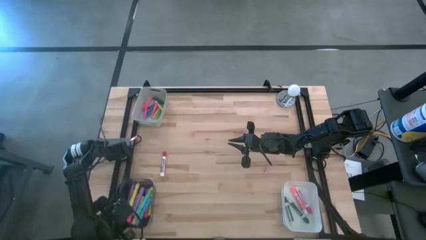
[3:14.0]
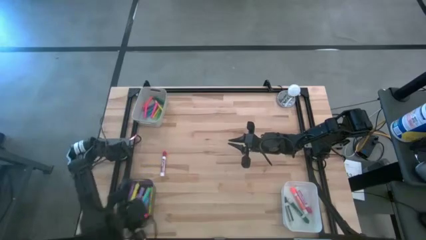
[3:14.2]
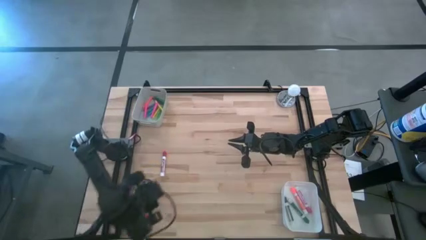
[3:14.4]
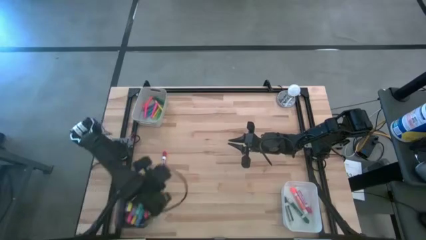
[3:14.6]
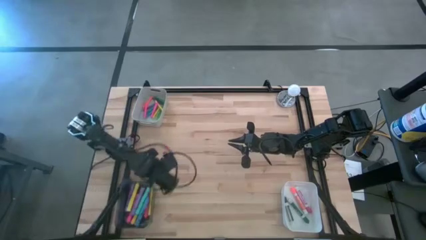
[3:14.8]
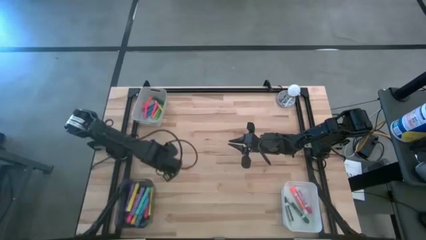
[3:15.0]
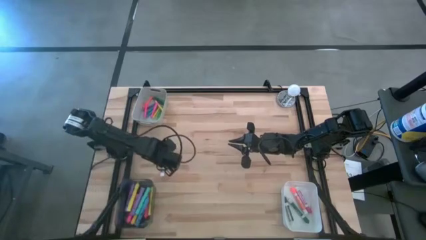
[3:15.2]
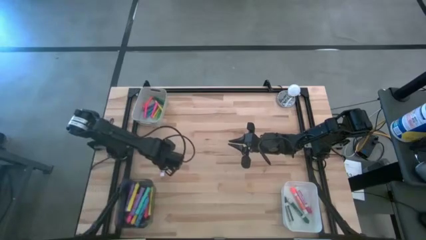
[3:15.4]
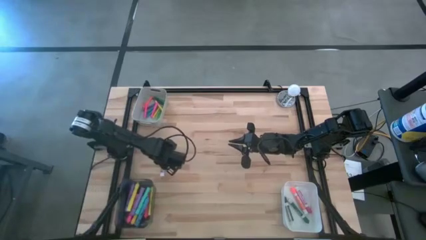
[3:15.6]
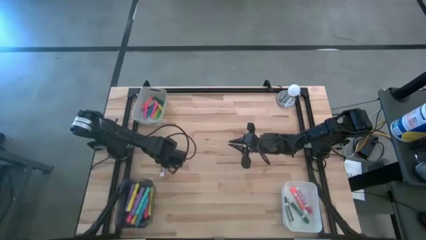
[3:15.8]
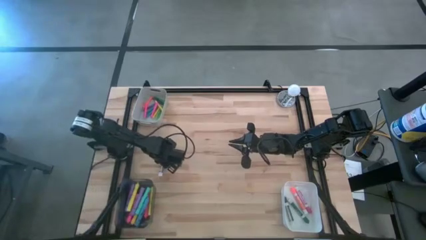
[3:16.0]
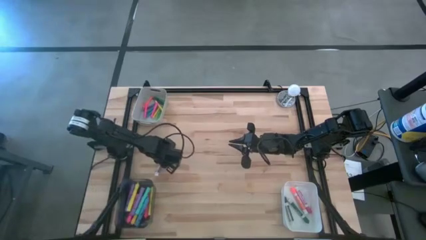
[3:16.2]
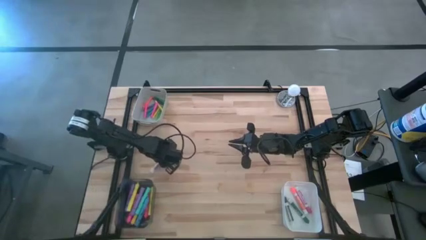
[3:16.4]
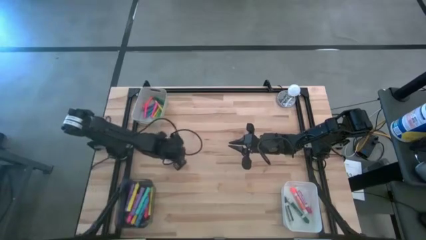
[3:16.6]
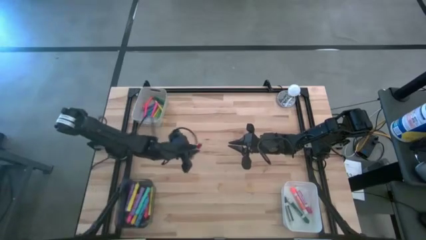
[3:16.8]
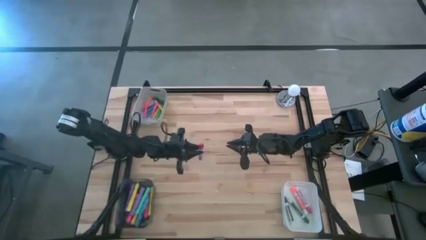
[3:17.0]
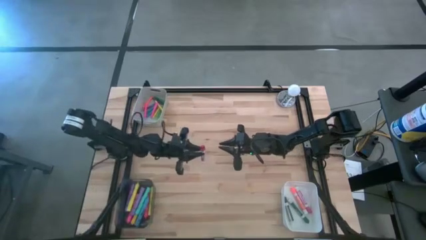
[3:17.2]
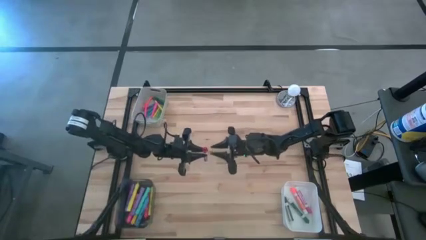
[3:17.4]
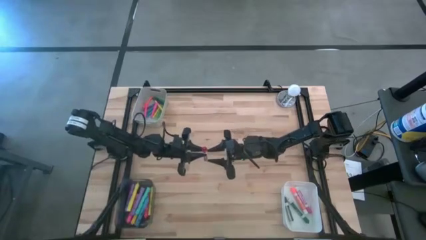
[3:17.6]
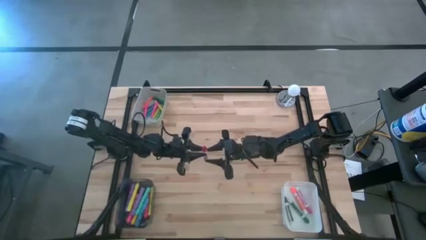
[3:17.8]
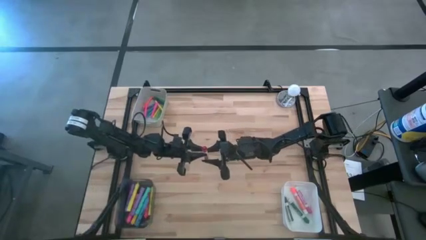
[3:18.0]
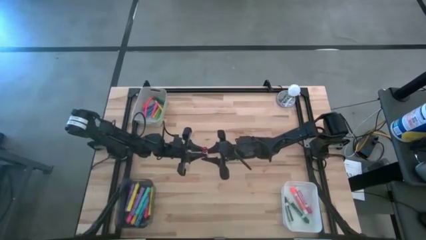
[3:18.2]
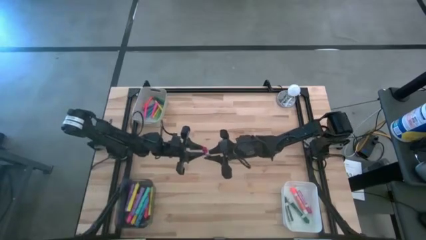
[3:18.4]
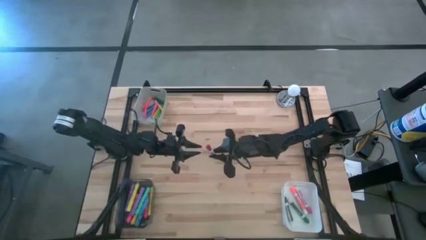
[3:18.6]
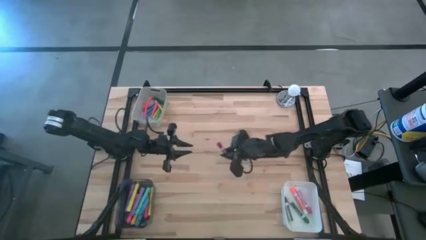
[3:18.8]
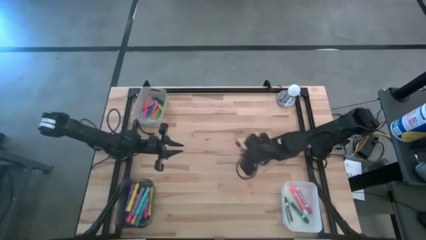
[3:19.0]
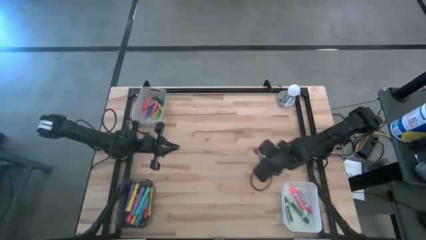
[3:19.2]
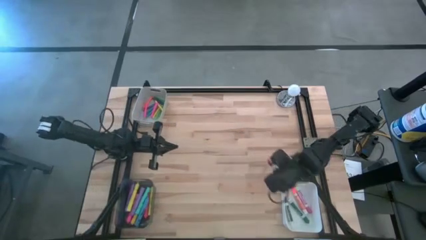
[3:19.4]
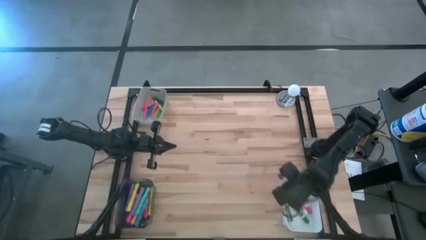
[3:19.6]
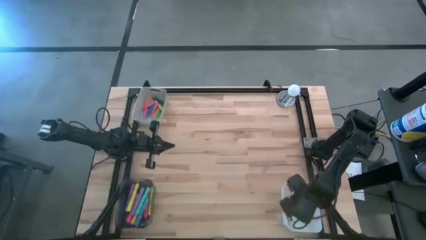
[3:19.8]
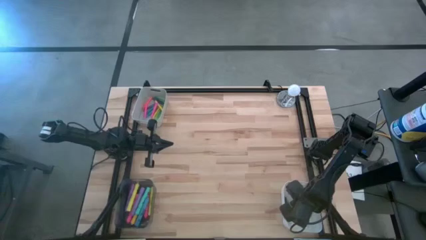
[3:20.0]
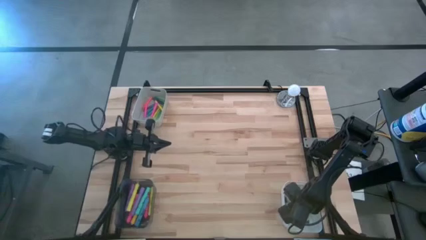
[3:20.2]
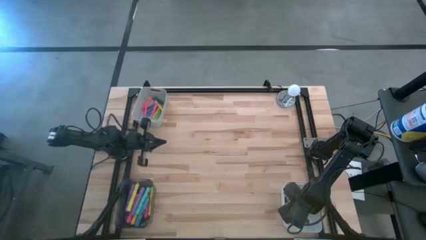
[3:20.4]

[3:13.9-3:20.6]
Task: Pick & Place Markers
Put the red marker pen into the white bin

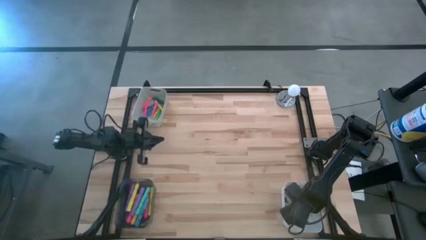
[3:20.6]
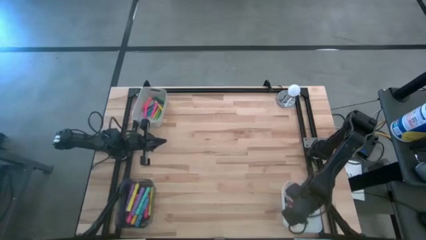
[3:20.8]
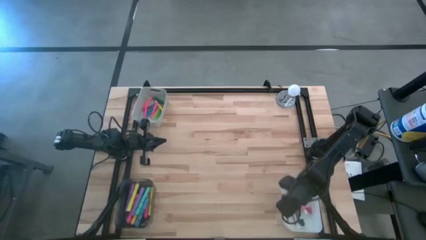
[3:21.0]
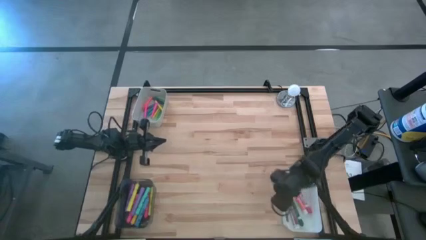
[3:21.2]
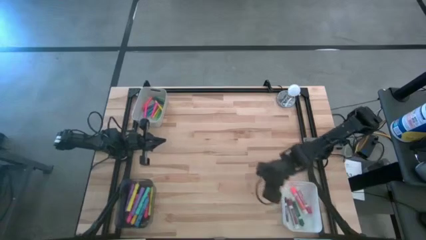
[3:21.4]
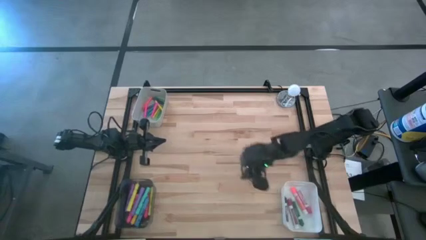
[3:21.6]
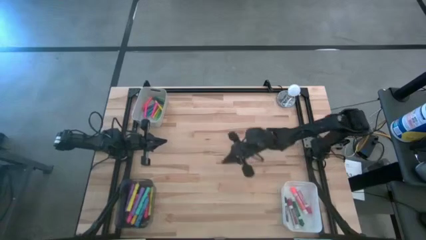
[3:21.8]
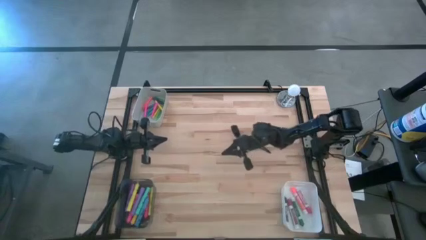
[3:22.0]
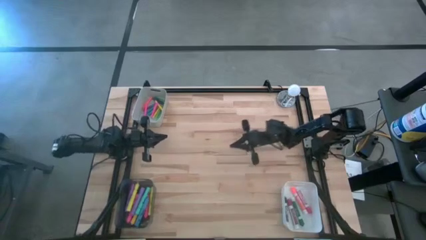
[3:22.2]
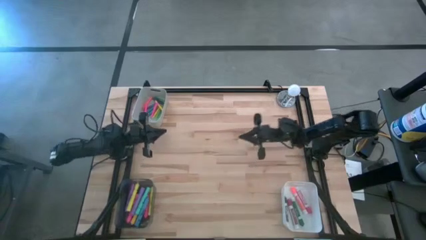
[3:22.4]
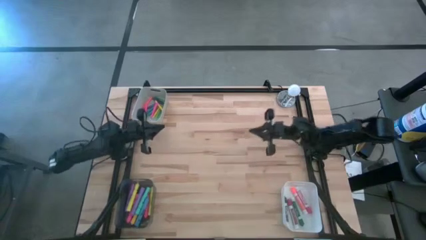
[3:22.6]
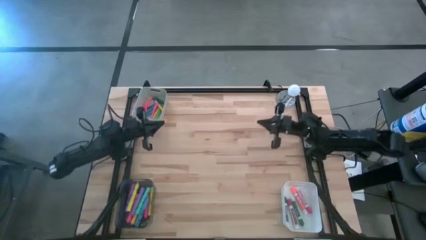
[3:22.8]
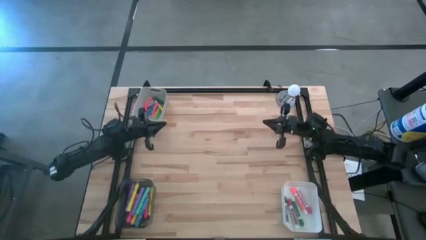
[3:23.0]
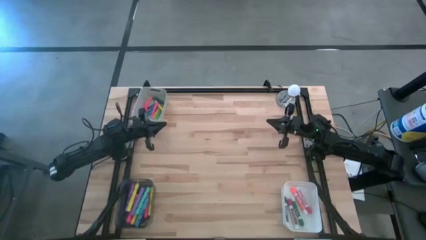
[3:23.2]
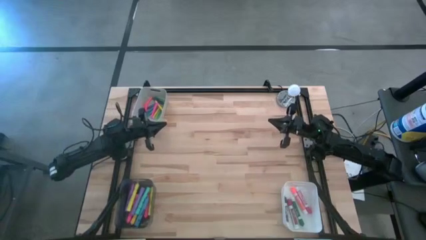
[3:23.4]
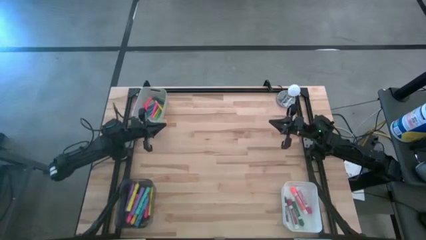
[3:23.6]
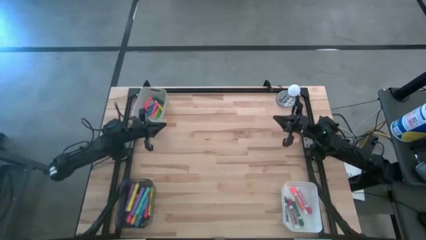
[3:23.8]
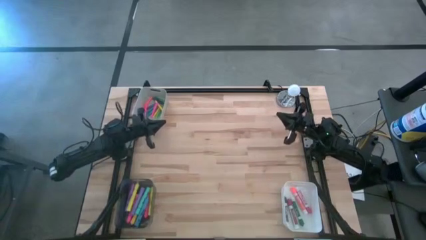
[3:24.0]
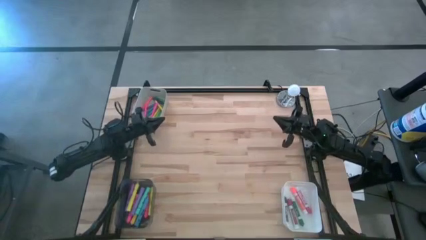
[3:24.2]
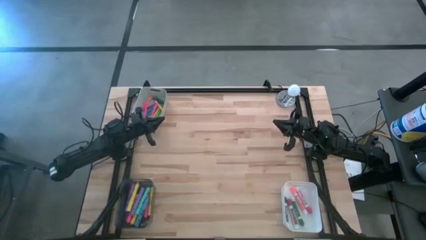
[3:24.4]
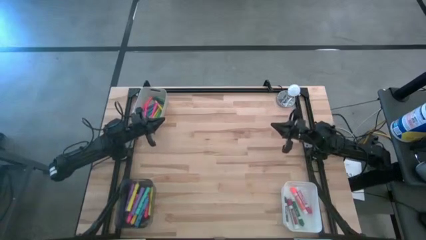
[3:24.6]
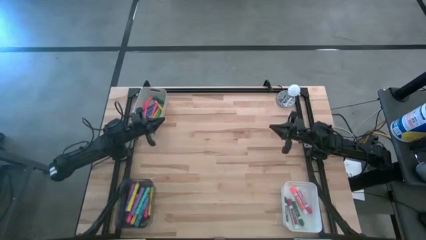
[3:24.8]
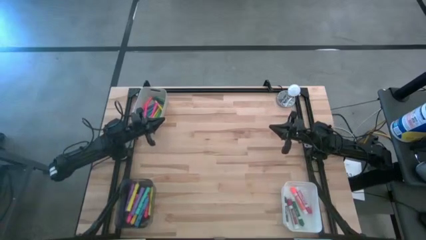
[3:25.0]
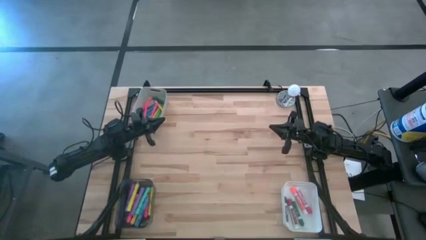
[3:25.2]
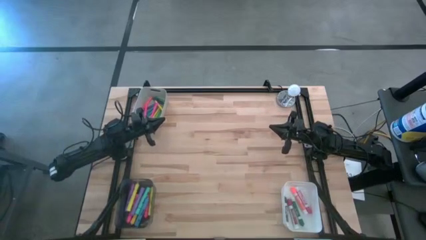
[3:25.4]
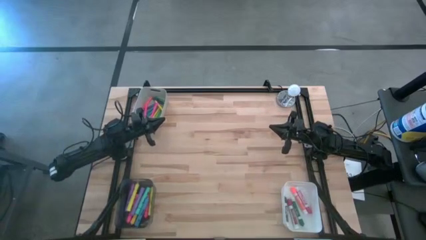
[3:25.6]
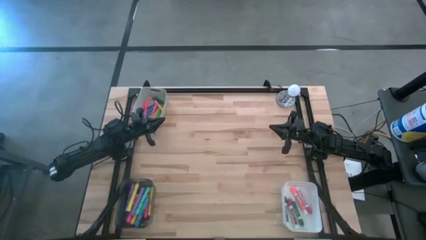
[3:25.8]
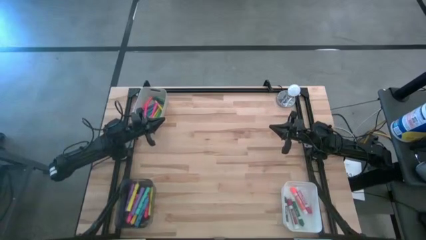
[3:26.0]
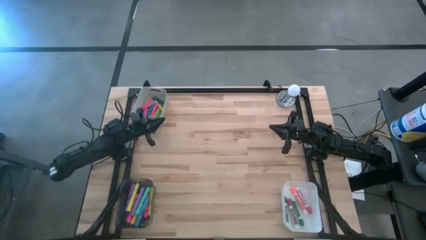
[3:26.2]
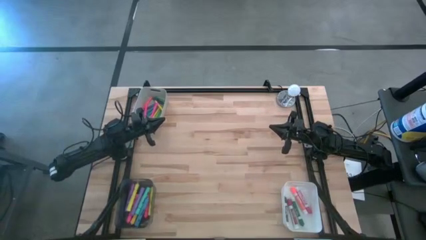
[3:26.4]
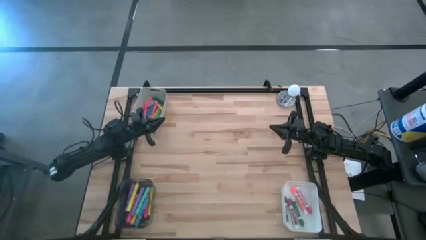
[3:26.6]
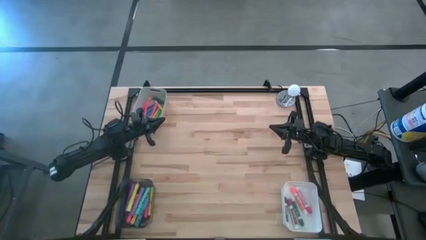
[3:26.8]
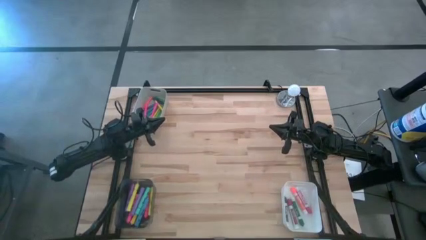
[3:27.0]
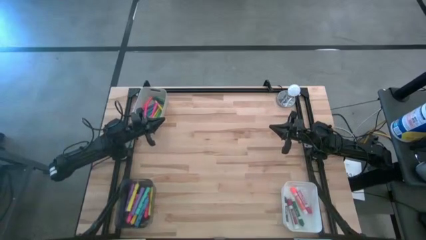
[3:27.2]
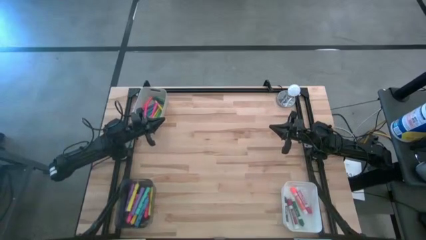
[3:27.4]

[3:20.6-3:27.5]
Return to Home Position

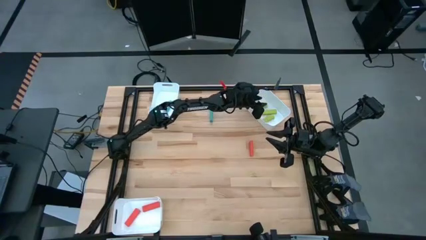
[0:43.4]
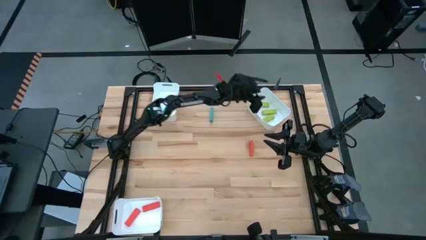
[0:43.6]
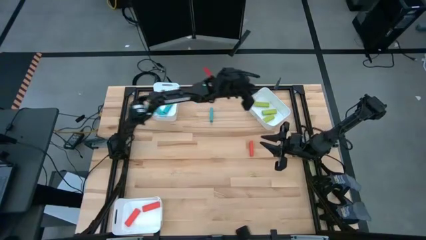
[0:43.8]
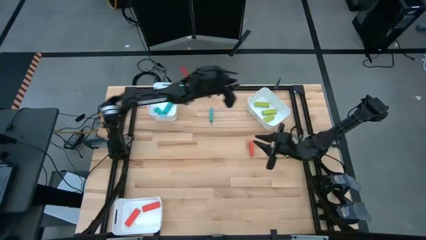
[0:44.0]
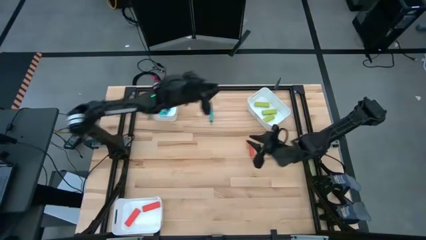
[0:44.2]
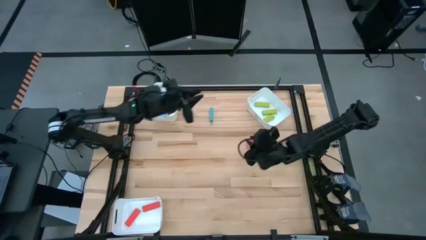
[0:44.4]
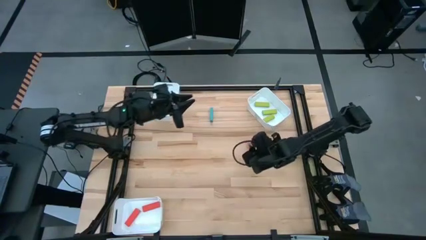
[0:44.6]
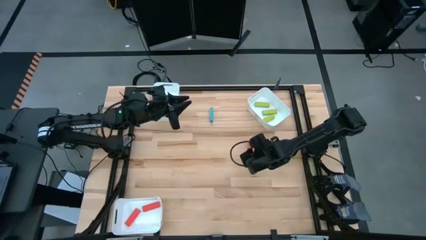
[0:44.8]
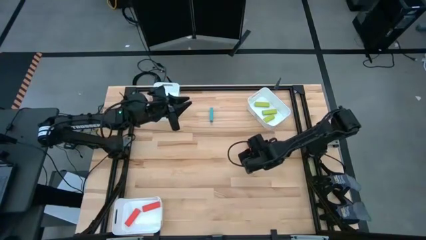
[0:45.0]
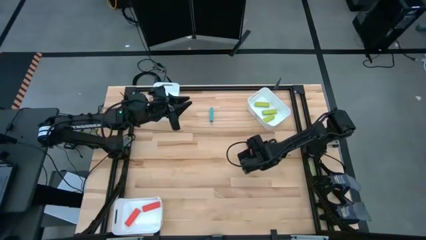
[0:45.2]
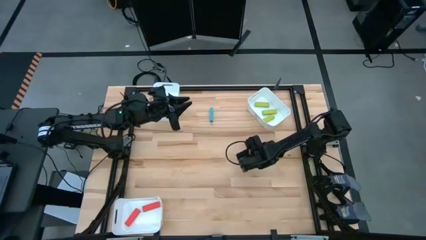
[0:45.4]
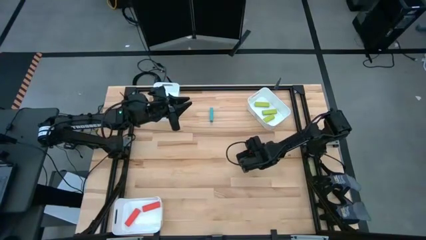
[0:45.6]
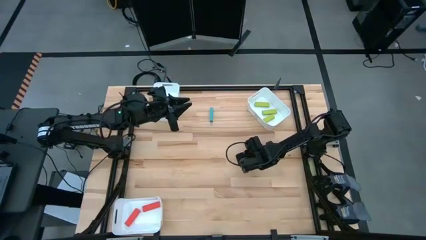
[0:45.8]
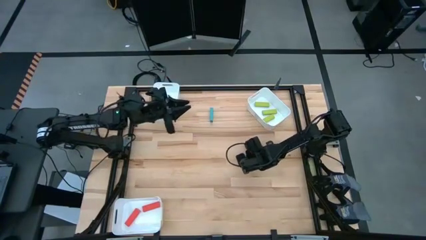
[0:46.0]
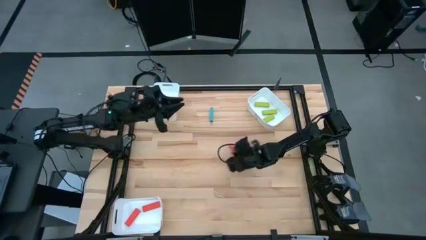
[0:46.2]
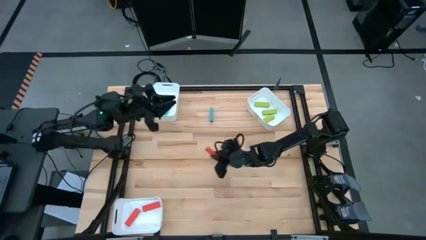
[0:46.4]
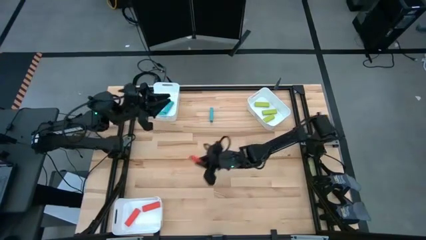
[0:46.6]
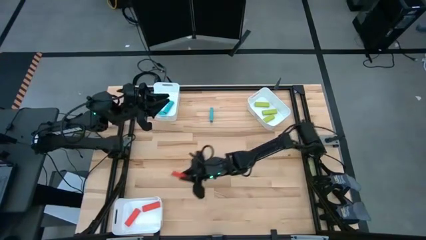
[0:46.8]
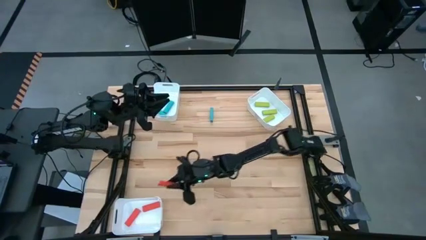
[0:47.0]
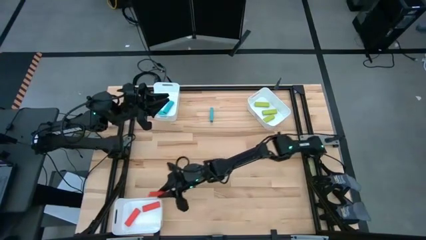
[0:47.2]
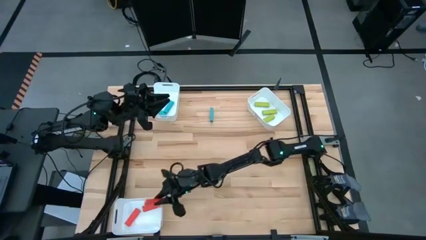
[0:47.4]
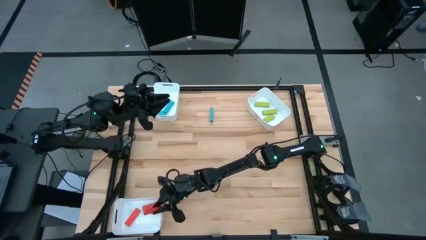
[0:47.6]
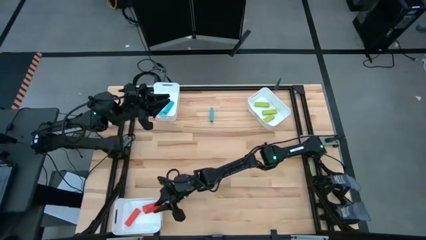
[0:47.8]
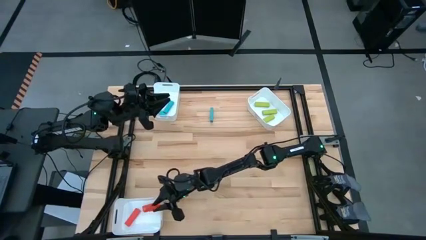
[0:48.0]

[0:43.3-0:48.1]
Task: Sort blocks
Put the red block into the bottom left white bin
